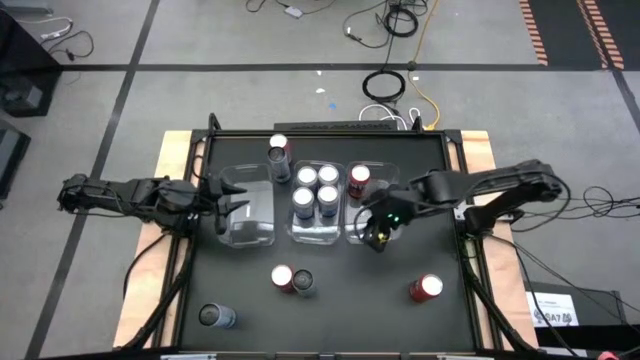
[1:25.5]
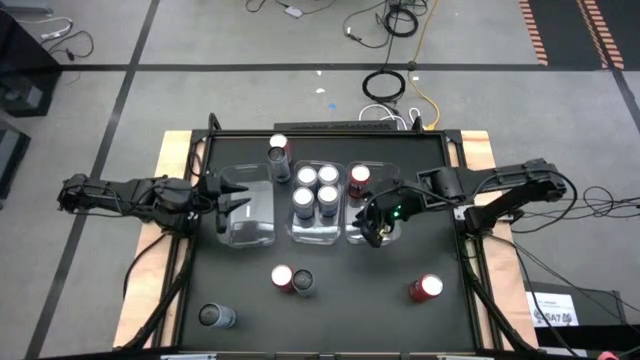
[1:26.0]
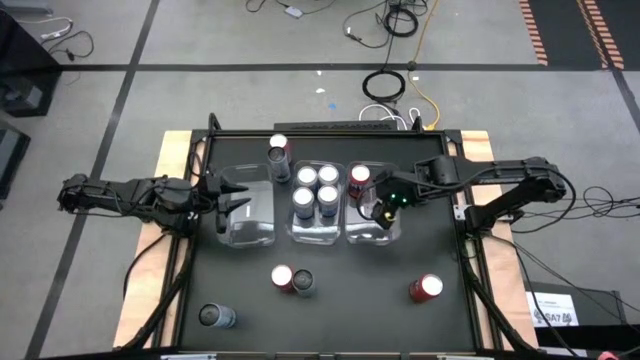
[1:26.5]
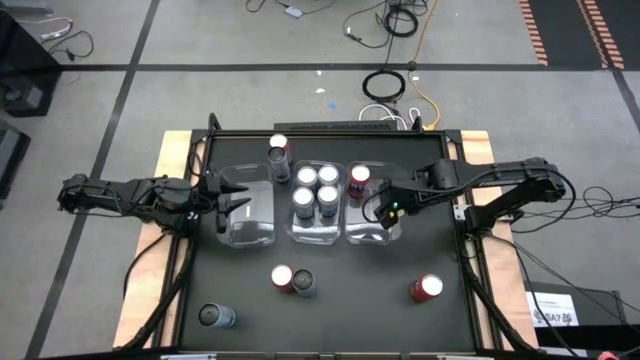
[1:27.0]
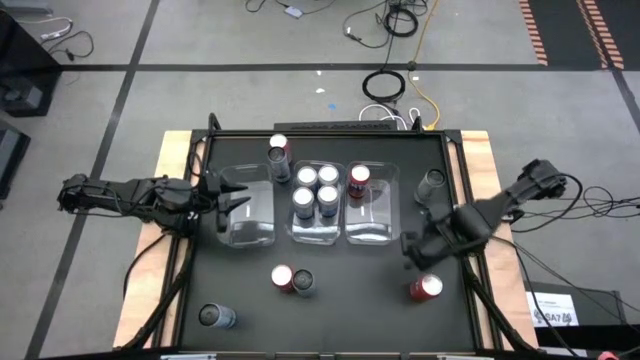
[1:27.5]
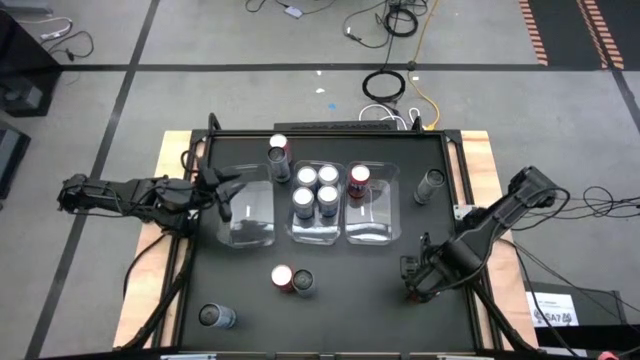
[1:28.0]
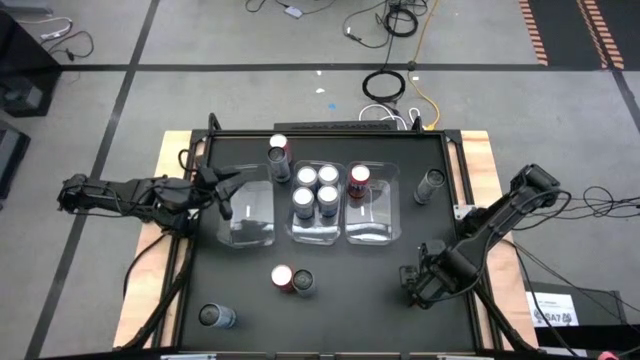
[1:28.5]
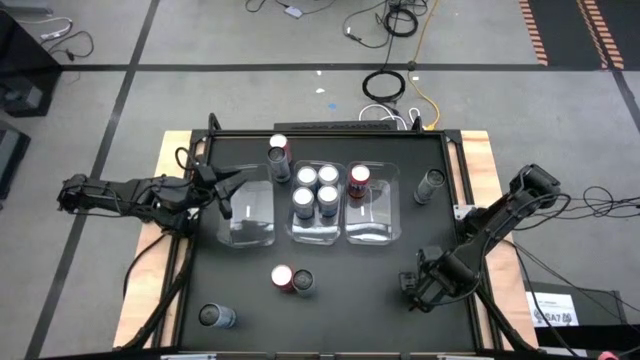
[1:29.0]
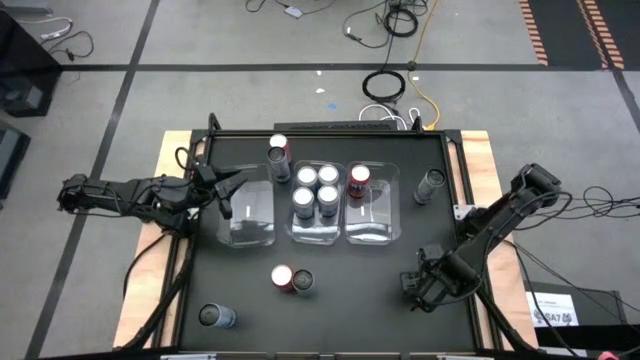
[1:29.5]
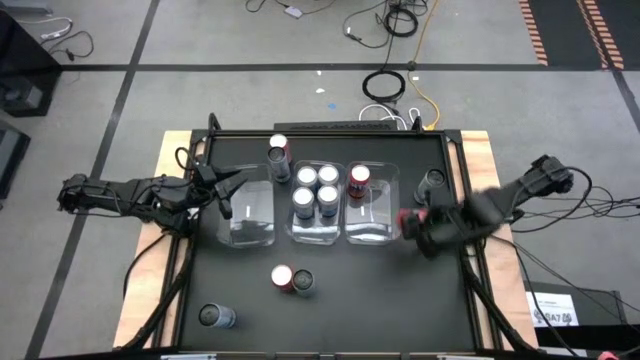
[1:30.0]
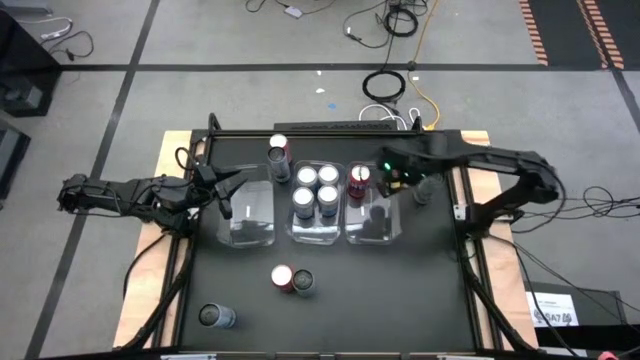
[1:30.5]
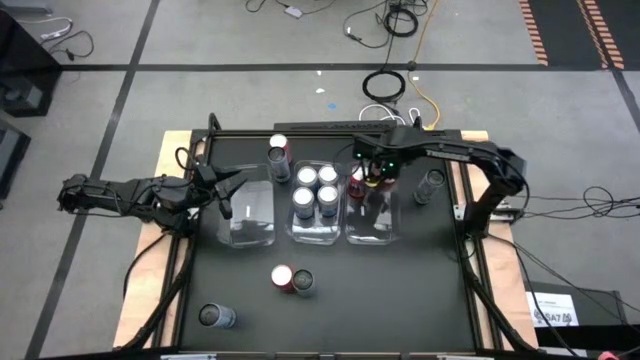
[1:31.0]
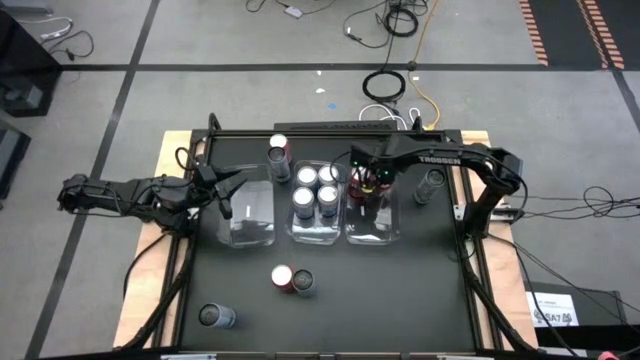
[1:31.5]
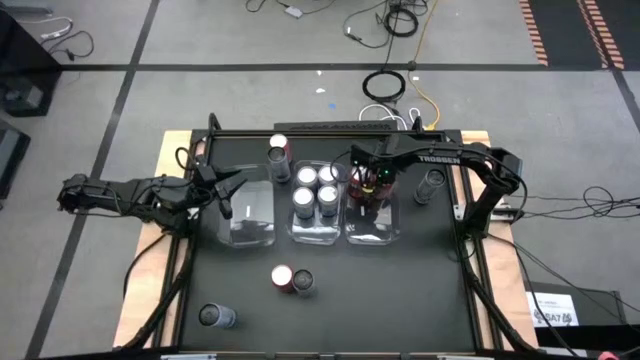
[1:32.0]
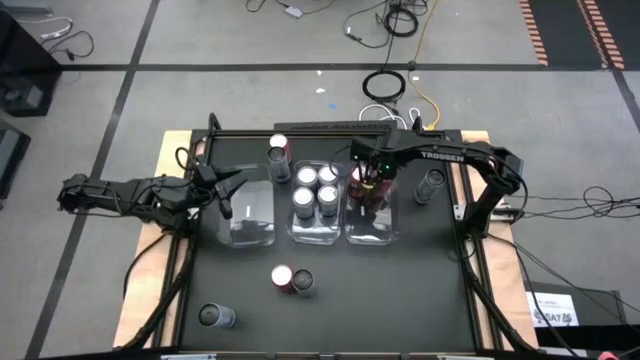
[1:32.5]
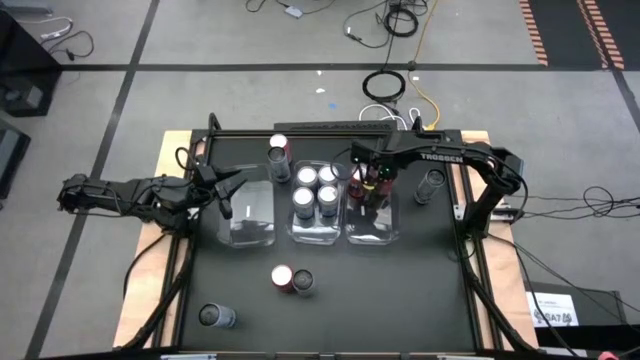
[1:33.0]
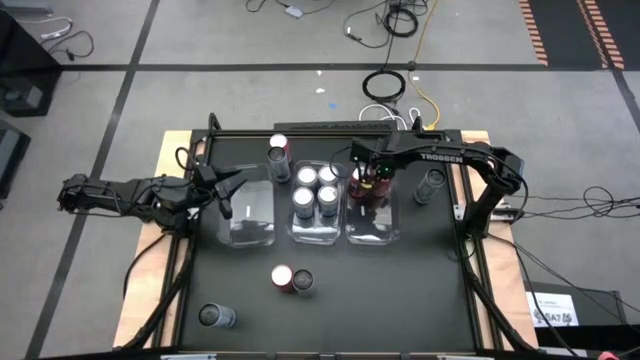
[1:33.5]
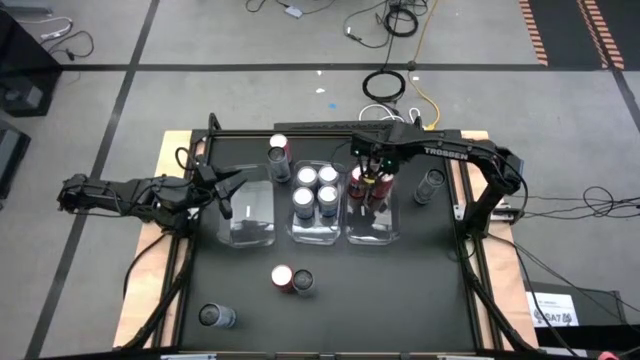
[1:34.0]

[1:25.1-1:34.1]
Task: Sort soda cans
Put the bottom right red soda can into the right transparent bin

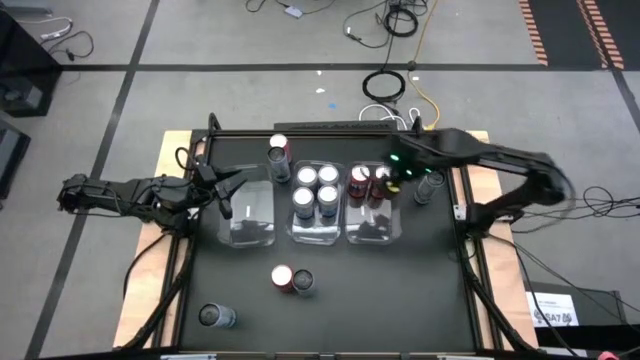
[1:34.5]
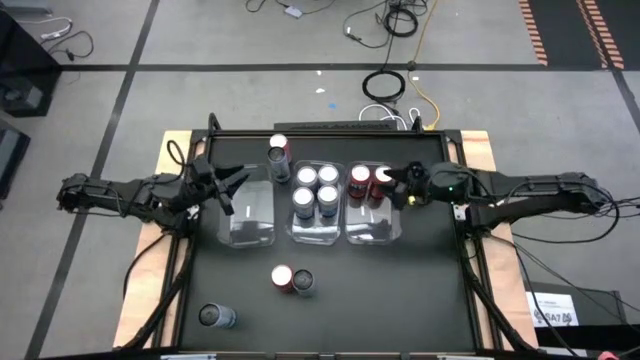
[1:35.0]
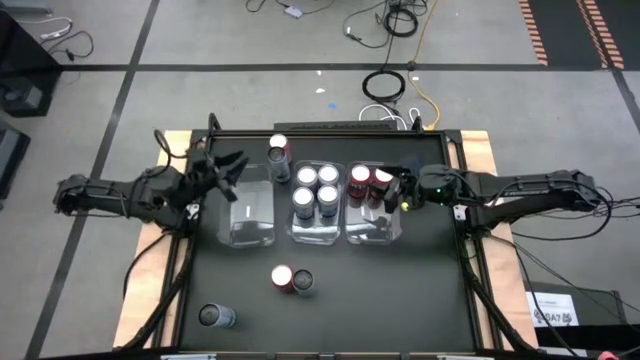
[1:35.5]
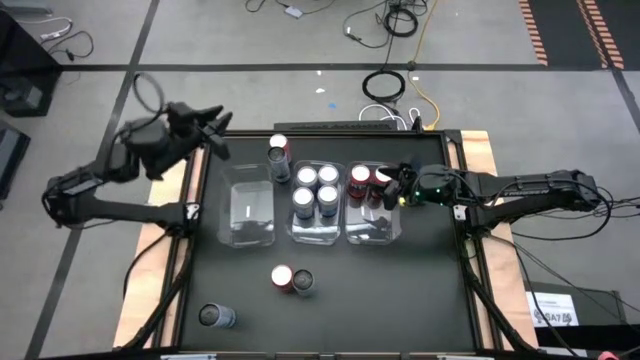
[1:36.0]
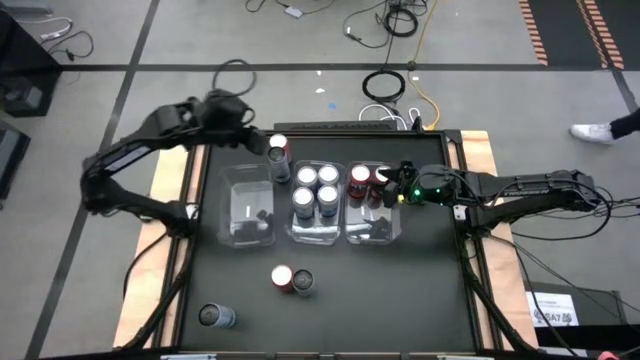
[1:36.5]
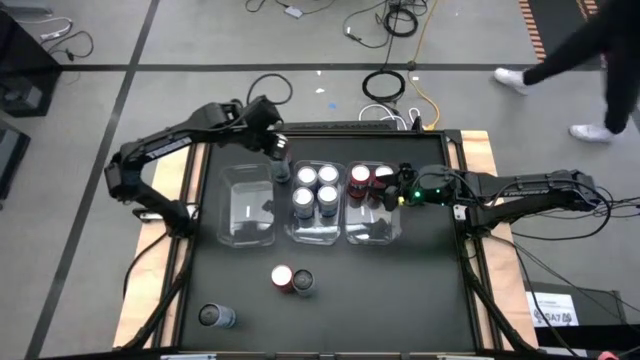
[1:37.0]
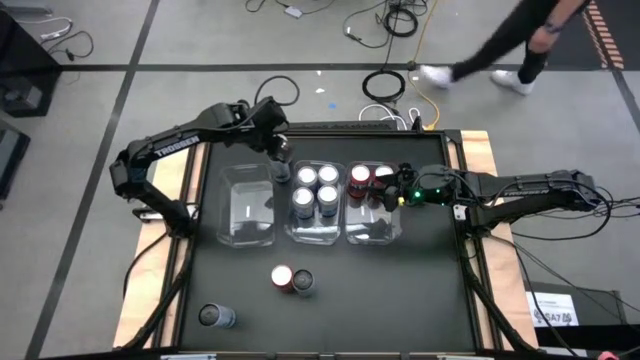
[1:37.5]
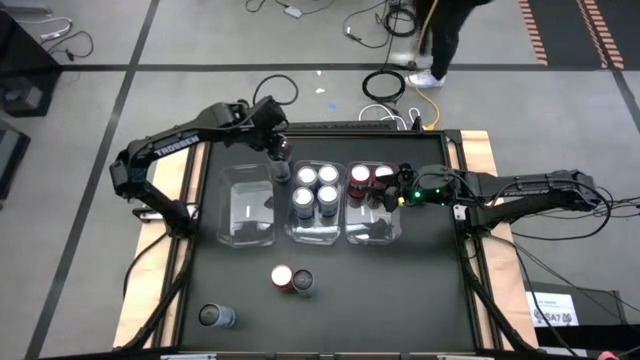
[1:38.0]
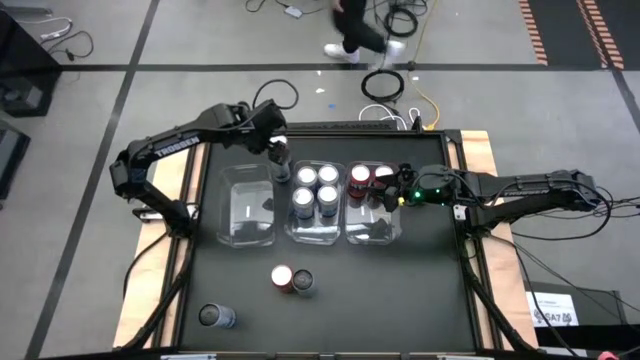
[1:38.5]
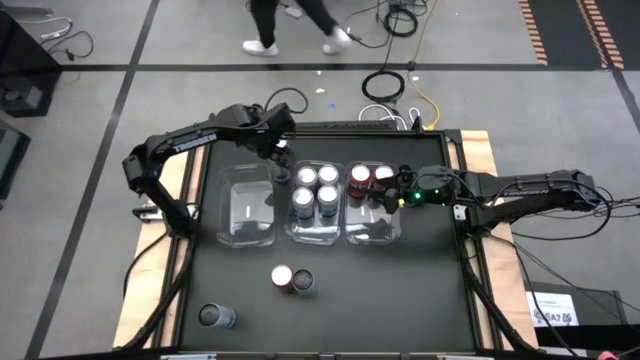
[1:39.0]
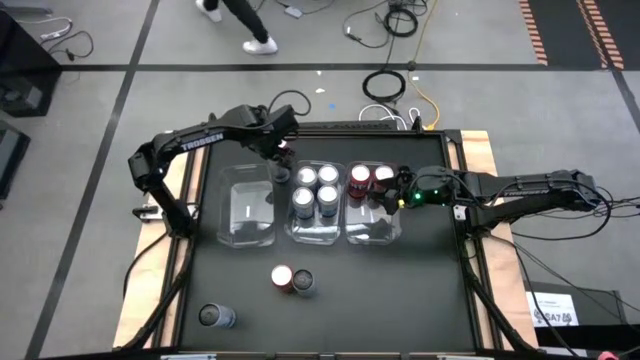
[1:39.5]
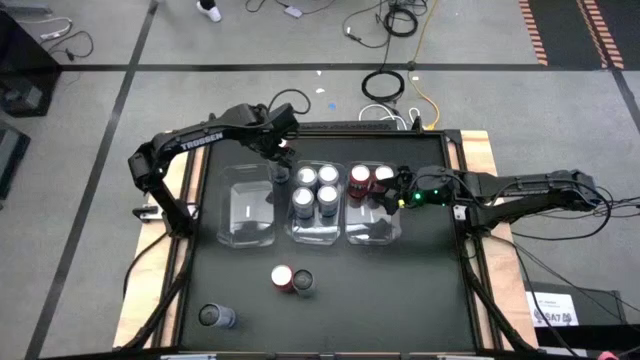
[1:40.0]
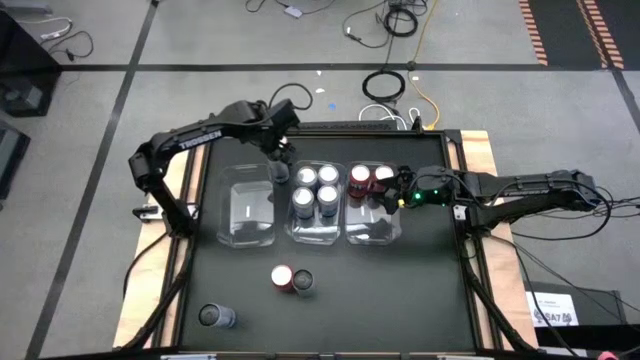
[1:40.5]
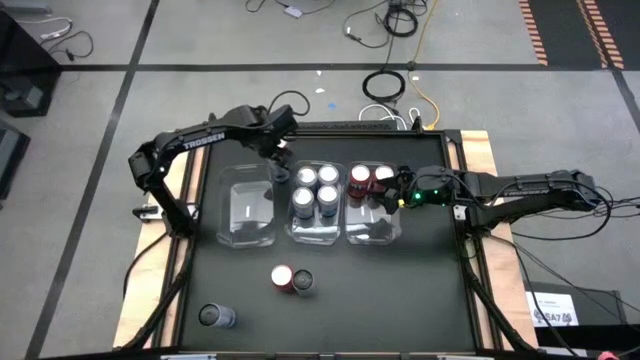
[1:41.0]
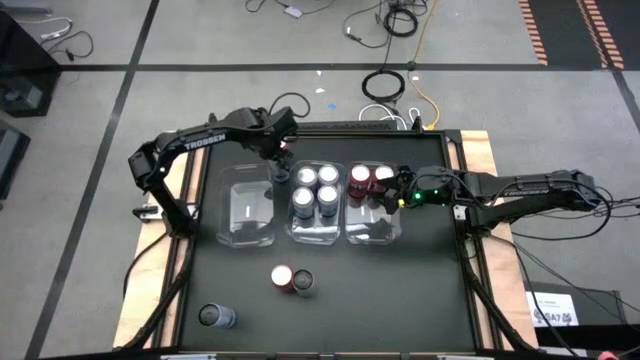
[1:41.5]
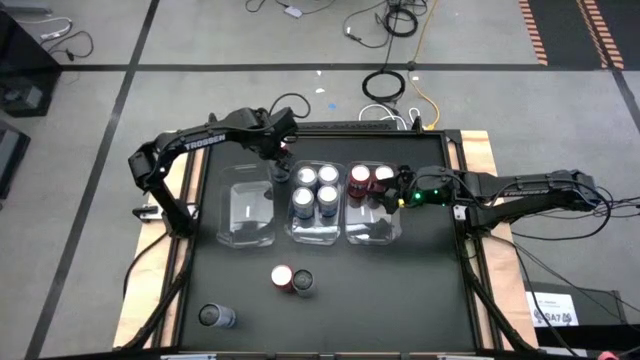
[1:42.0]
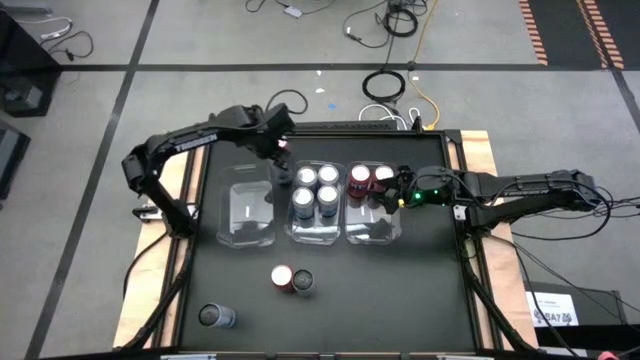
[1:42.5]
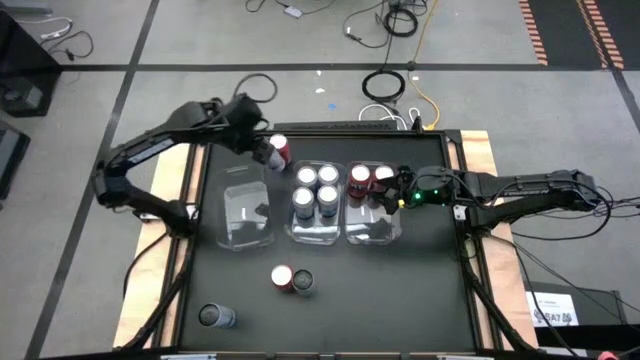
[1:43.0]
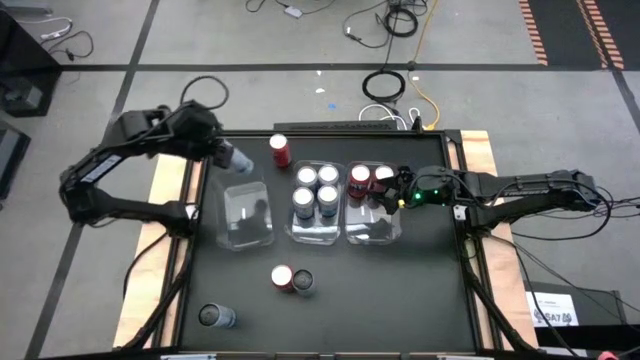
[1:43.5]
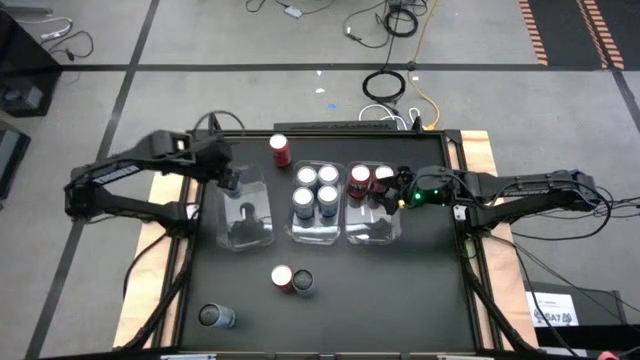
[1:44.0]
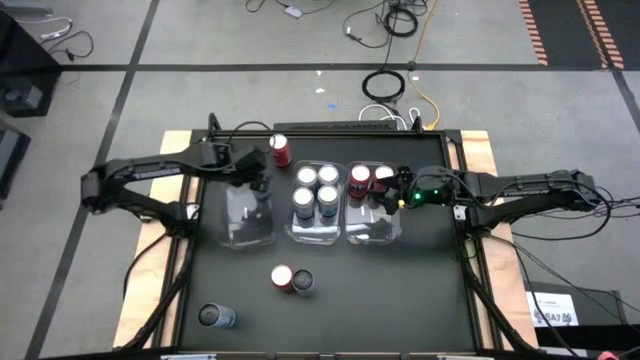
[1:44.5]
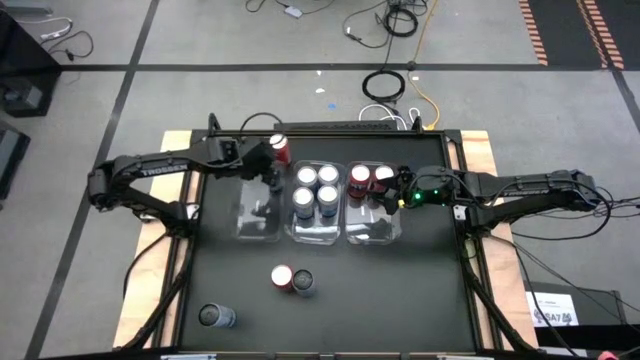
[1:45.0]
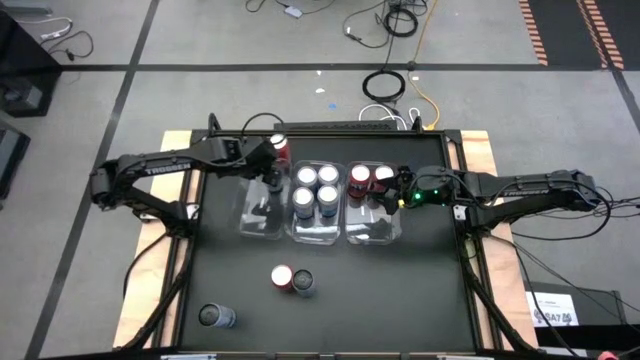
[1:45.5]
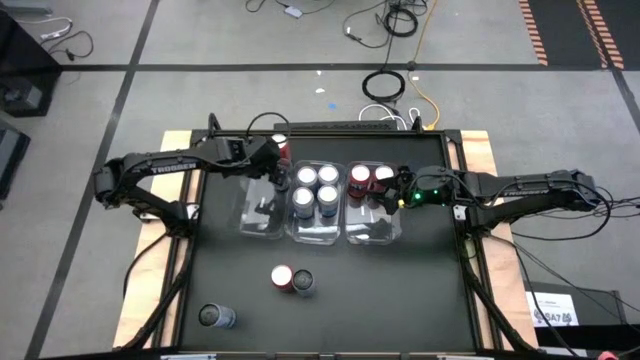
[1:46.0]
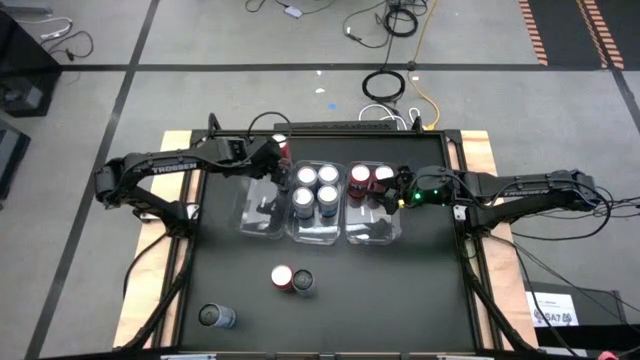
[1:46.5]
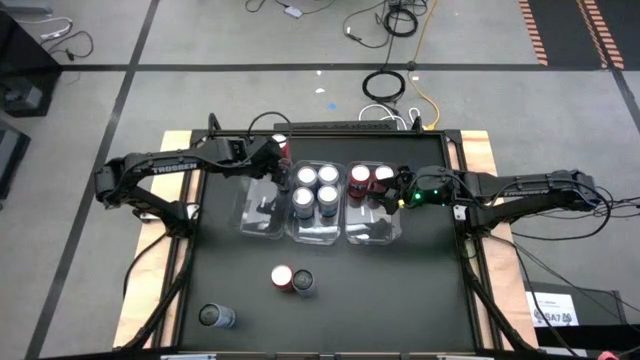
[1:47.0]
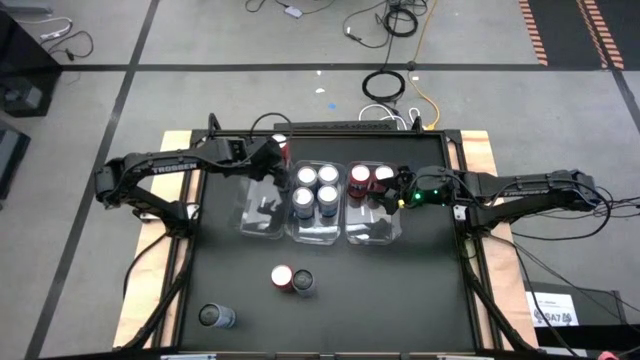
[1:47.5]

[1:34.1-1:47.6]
Put the top left white-blue soda can into the left transparent bin
